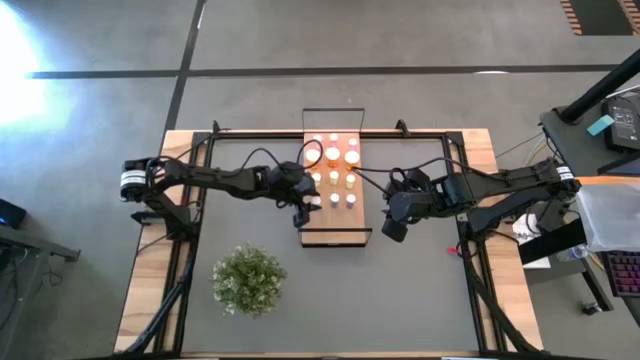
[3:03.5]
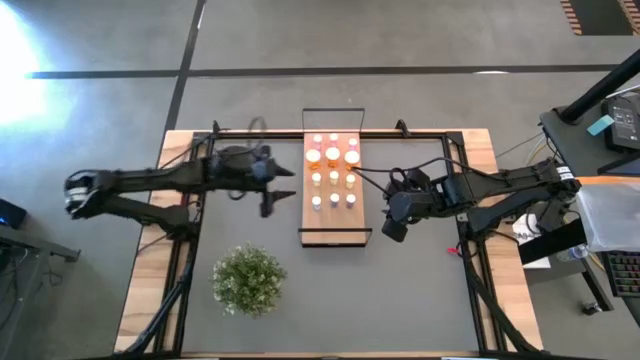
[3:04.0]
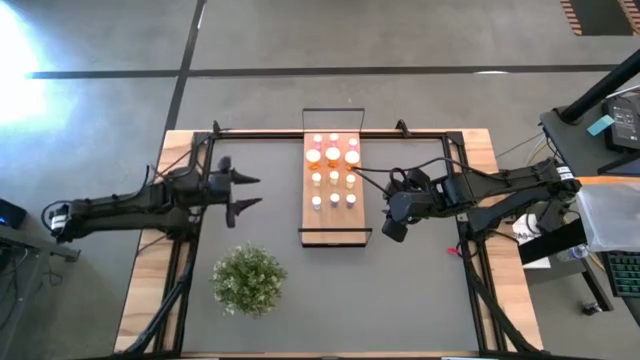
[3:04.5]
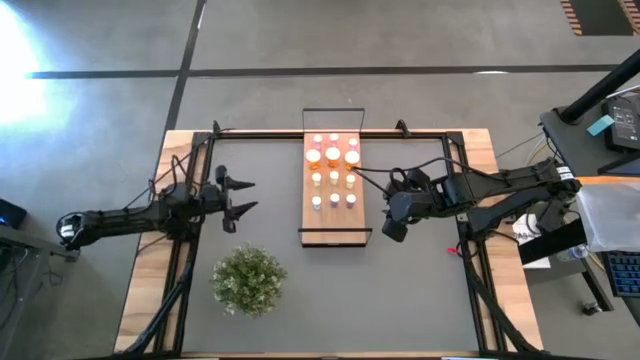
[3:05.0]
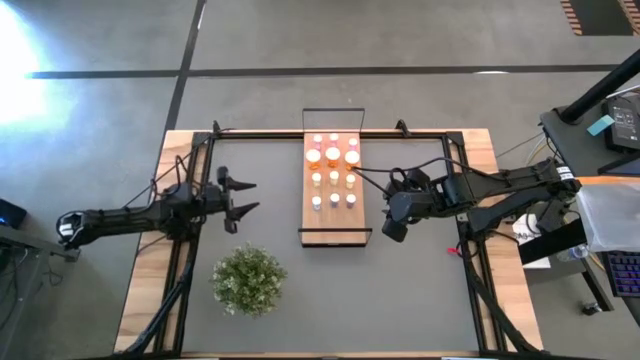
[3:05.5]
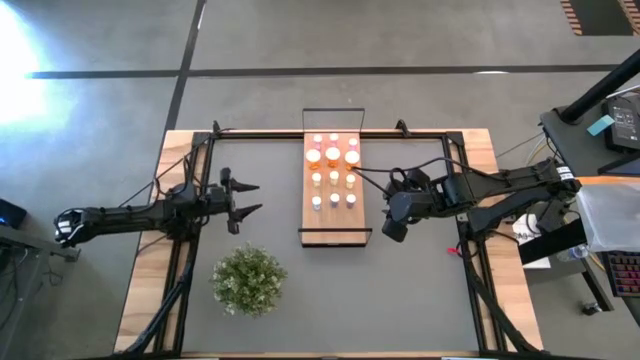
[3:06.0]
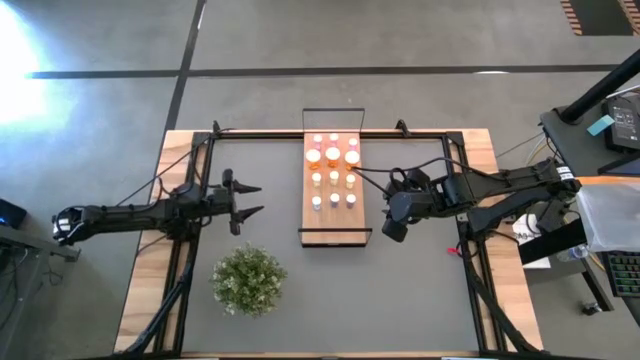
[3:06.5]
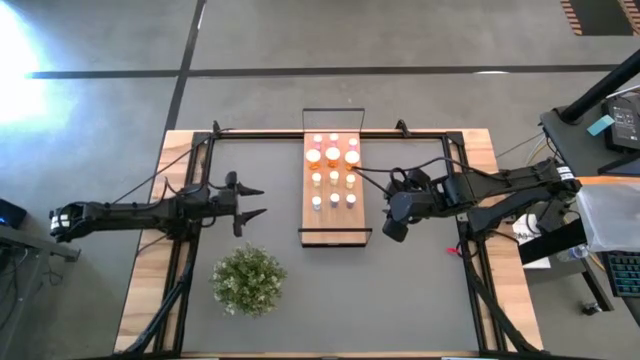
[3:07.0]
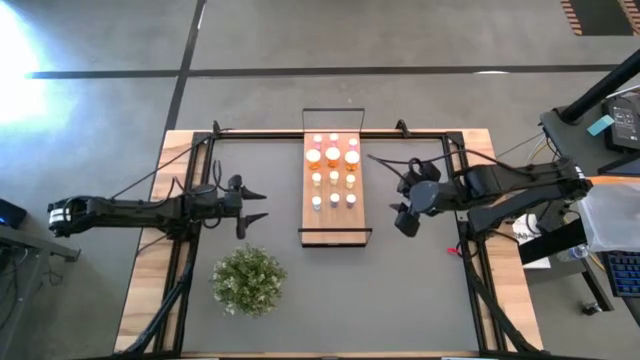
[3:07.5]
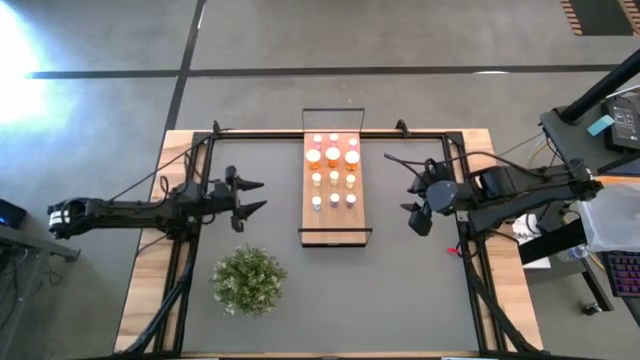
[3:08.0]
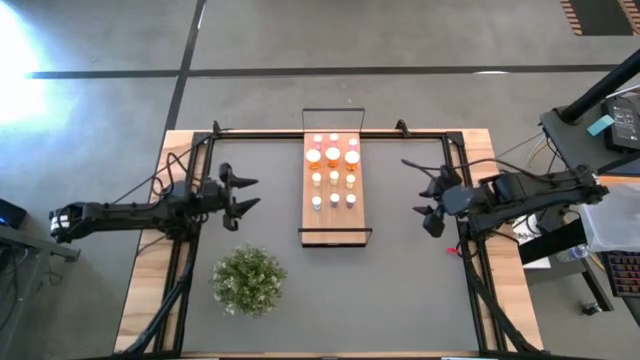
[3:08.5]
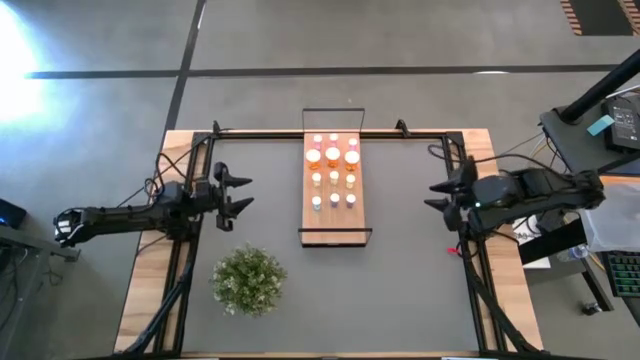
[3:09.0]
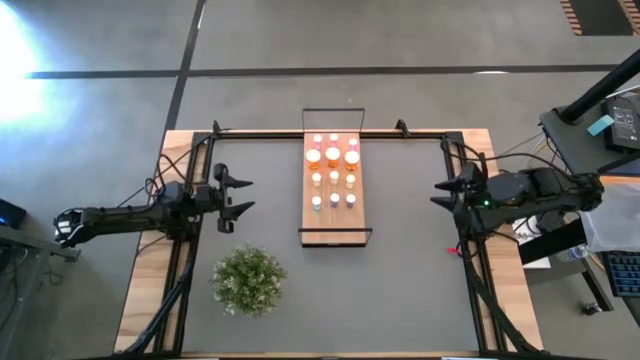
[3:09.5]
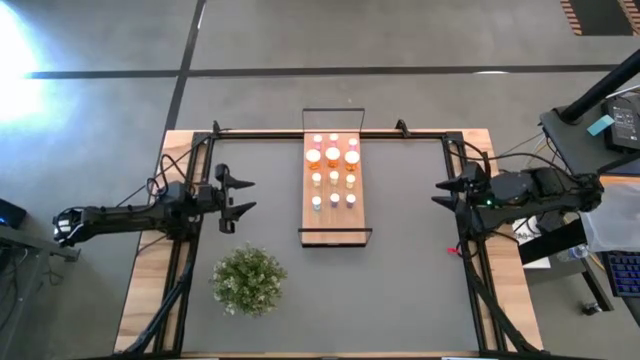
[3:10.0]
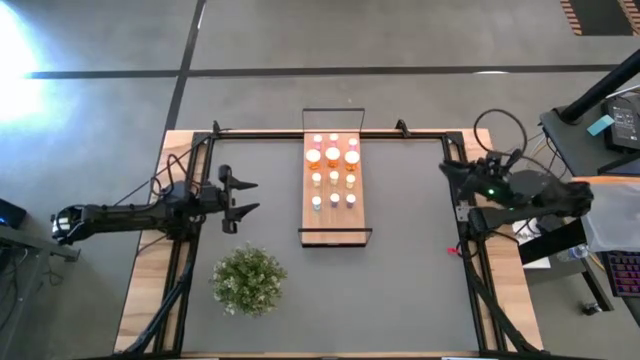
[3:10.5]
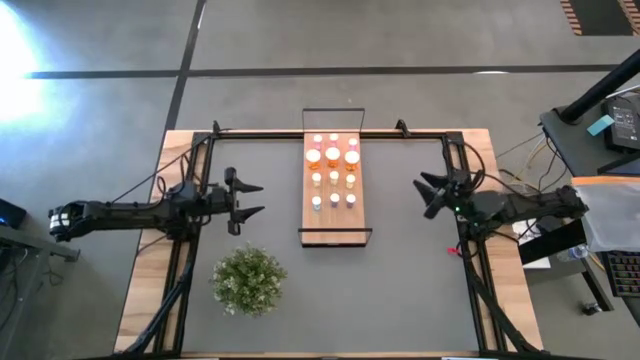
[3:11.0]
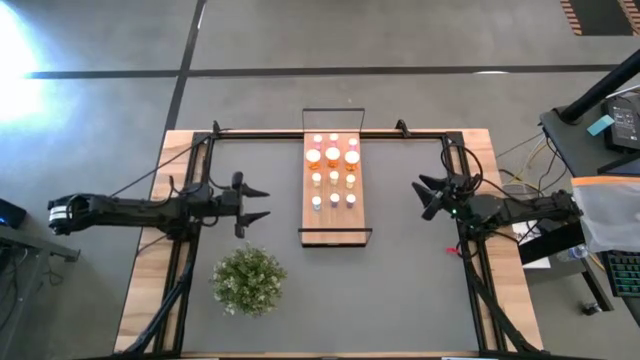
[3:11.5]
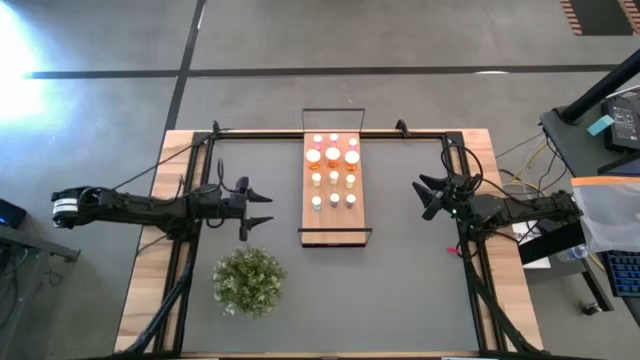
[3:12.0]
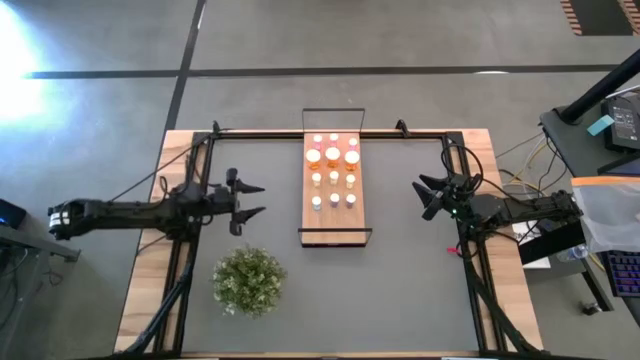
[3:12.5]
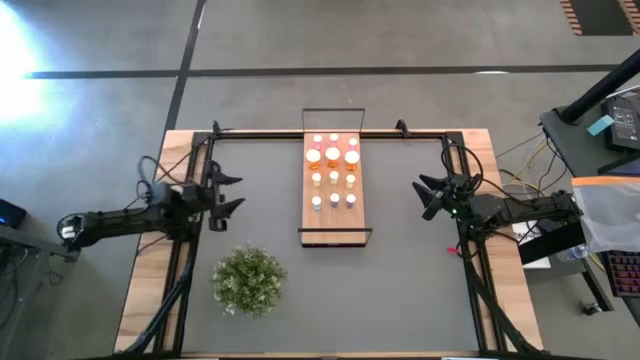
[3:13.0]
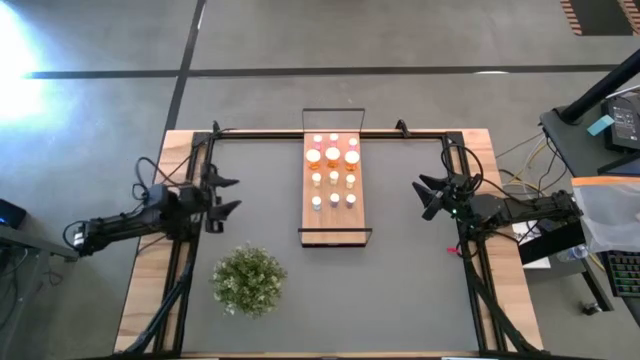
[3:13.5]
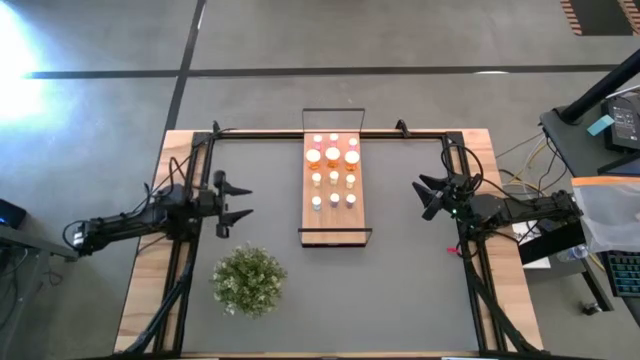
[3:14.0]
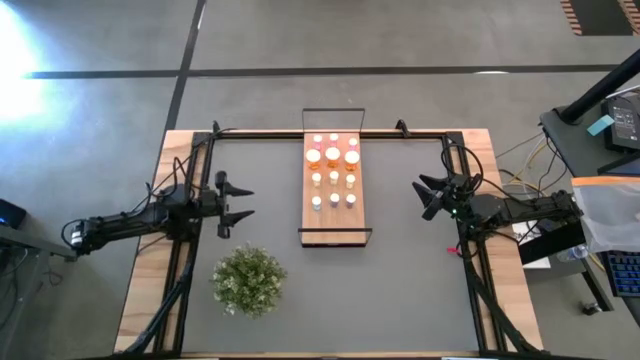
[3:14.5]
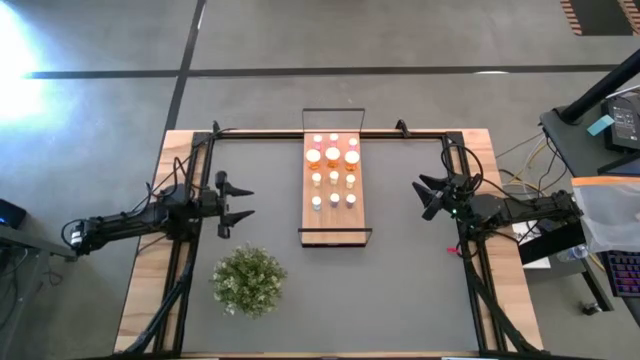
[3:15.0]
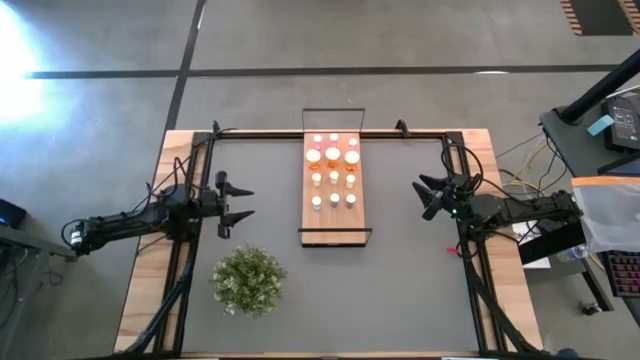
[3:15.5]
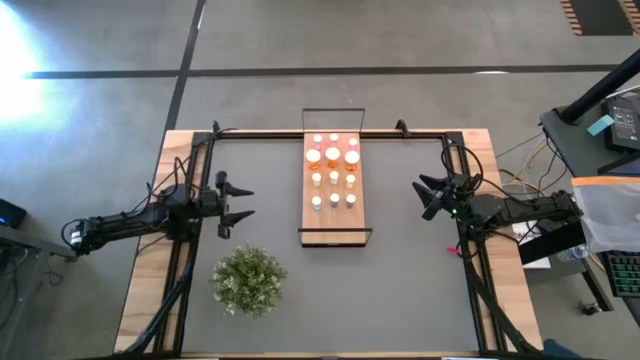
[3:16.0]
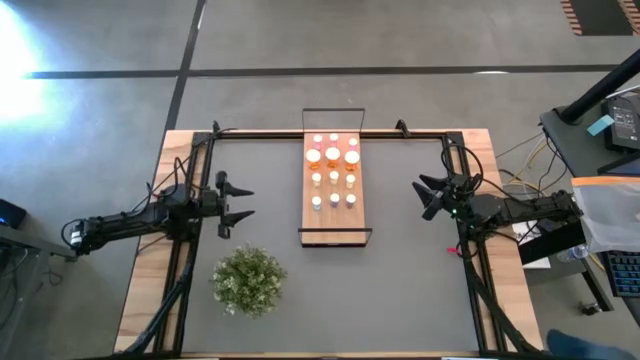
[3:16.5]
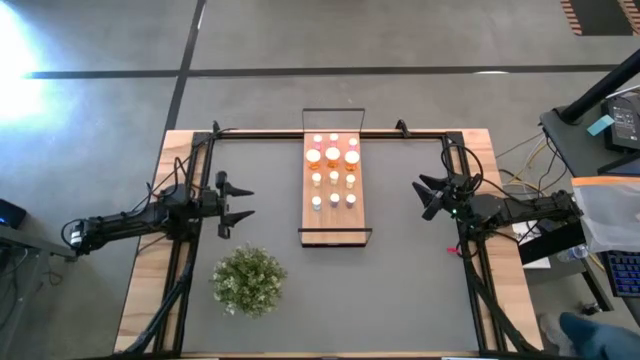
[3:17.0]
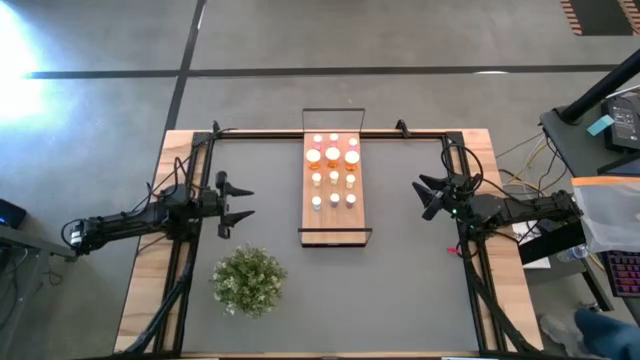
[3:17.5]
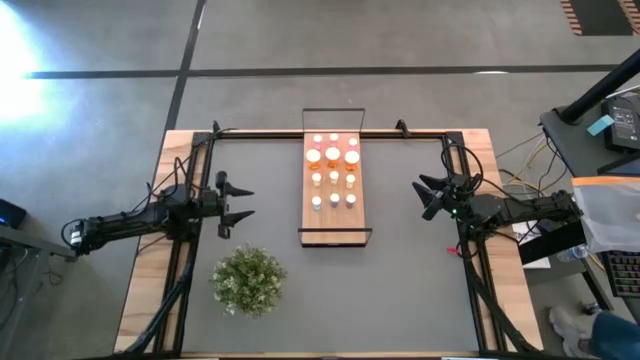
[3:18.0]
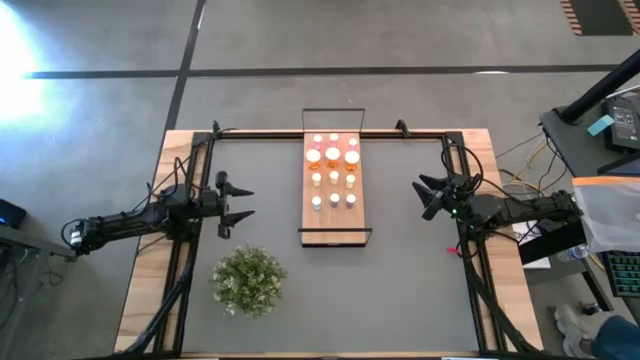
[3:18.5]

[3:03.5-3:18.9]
Task: Pick and place medicine bottles onto shelf by color
Return to Home Position

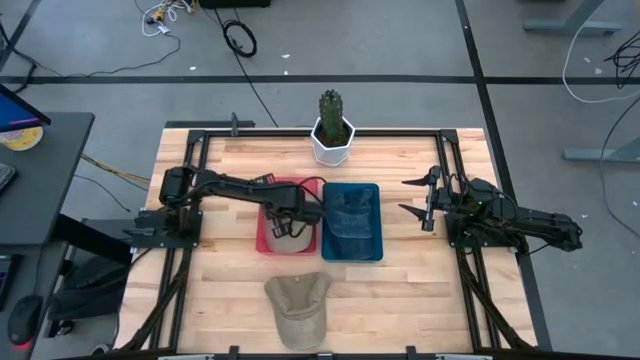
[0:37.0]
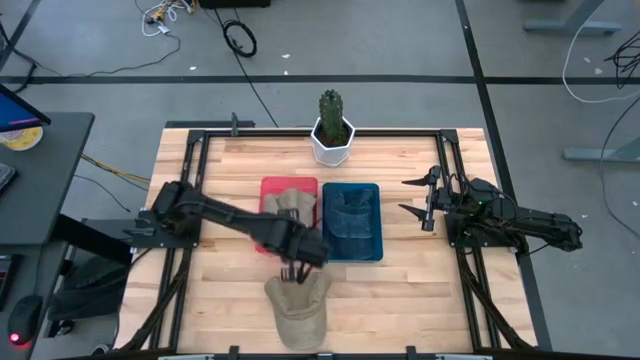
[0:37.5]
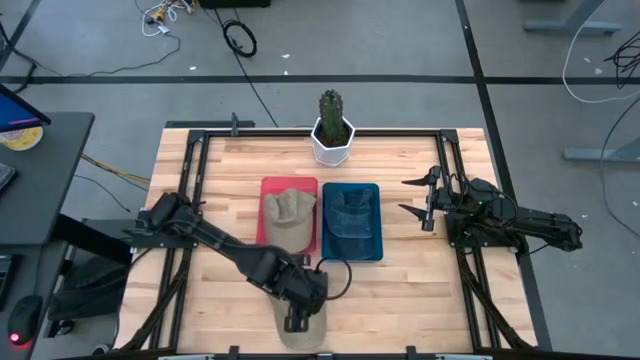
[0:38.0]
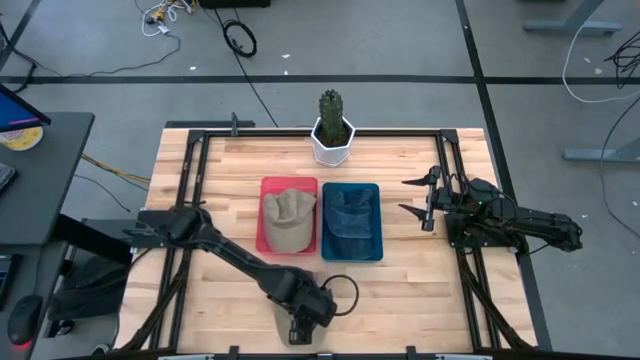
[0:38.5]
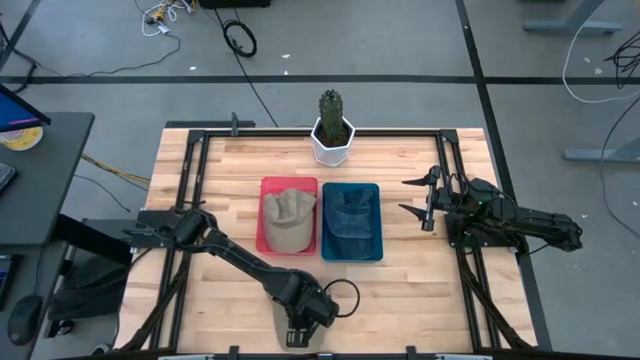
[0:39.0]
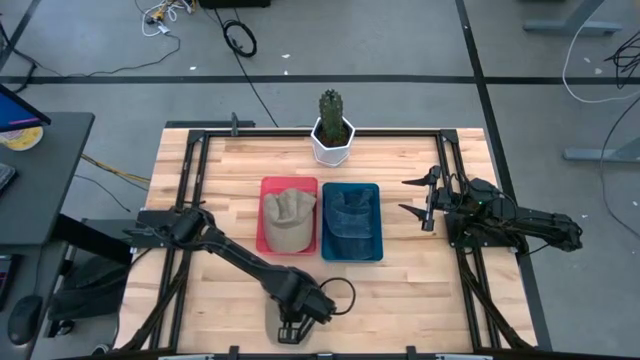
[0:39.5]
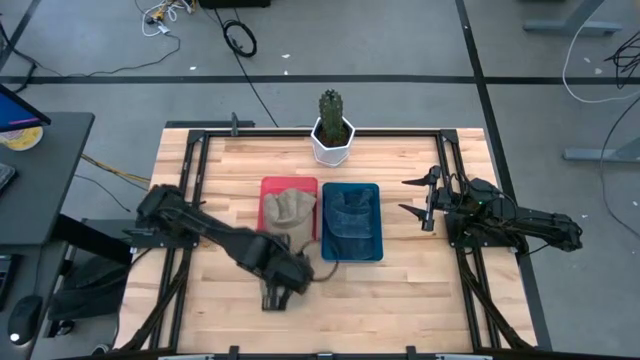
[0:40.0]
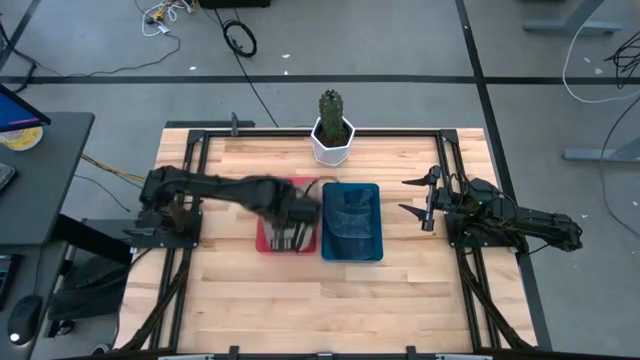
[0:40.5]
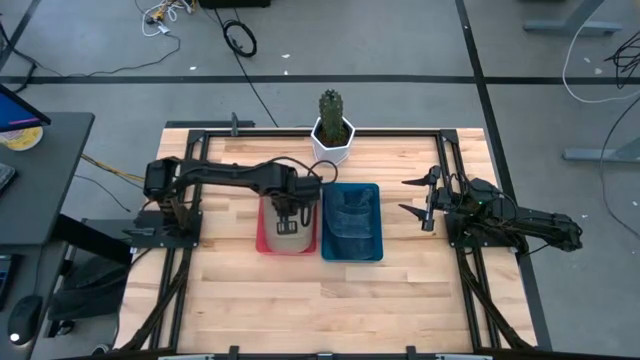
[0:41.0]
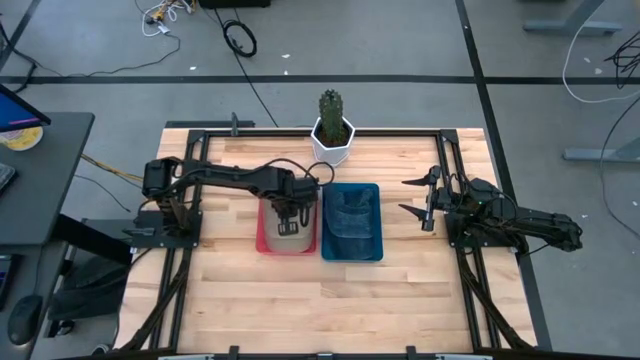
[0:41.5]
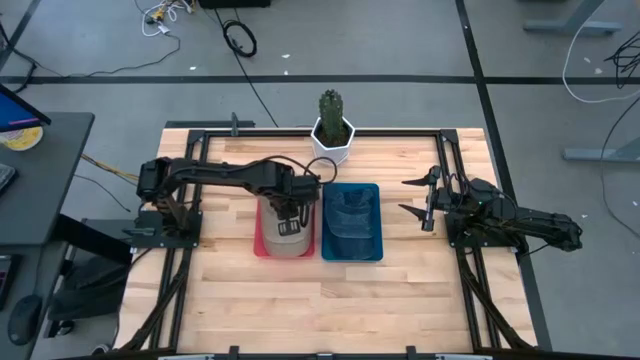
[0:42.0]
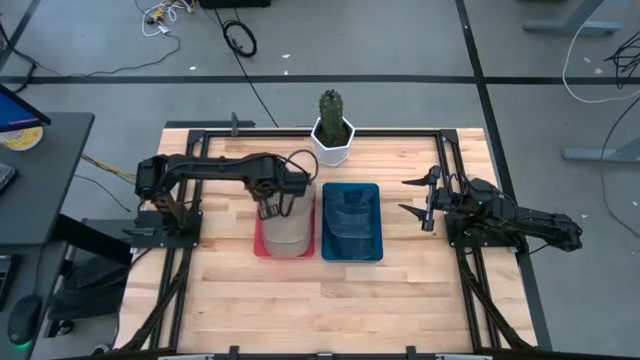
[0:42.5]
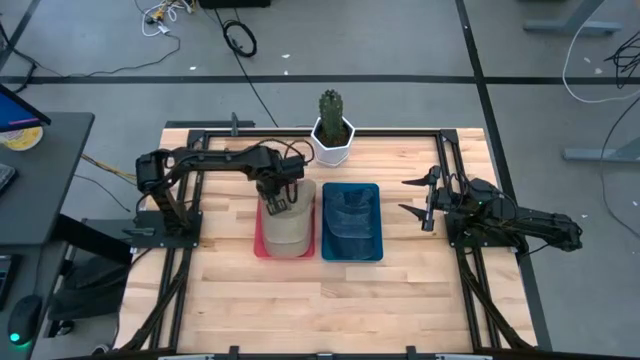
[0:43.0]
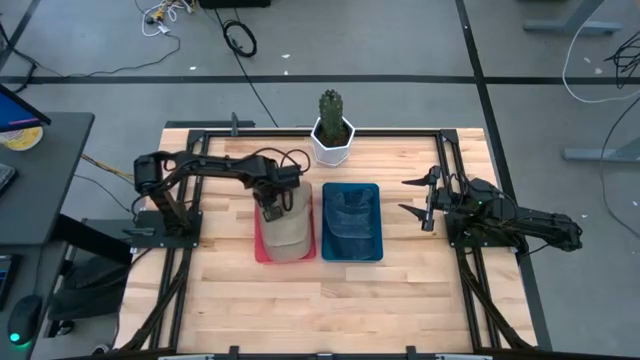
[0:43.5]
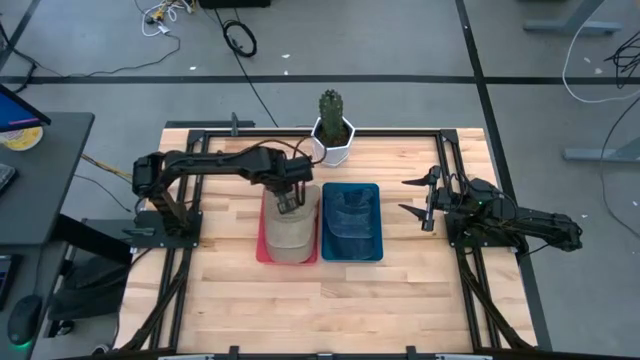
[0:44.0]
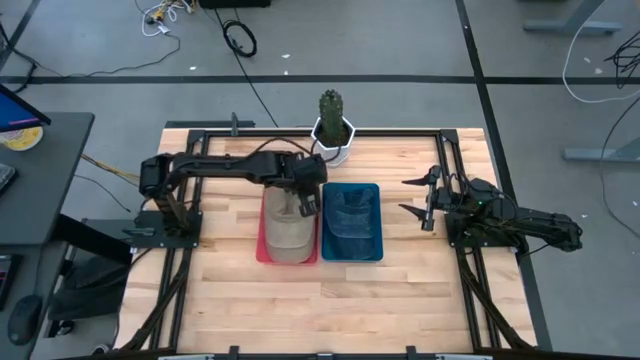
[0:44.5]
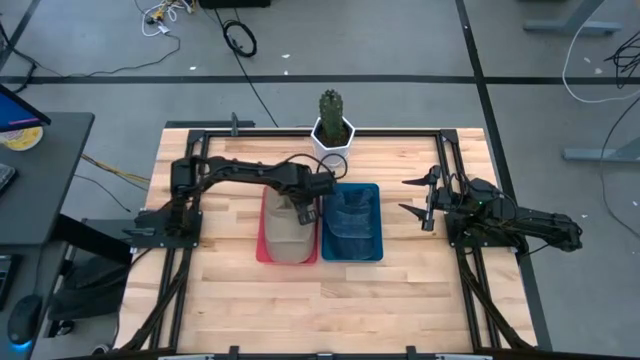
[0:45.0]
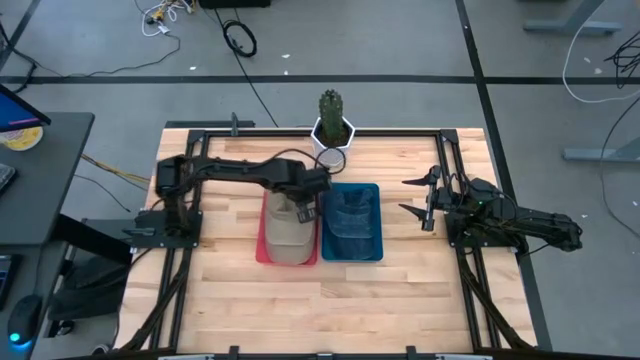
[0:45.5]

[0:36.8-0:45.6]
Task: Pick & Place hat
Put the brown cap into the pink bin
